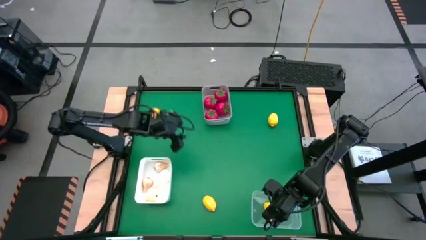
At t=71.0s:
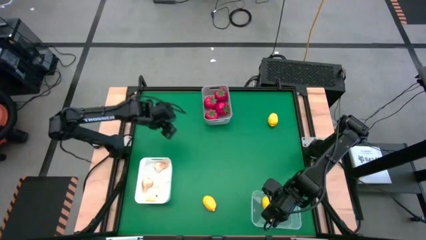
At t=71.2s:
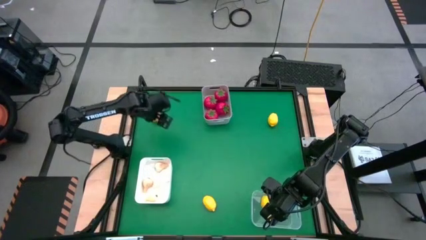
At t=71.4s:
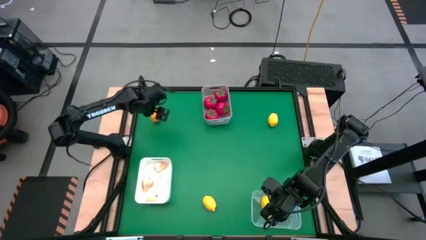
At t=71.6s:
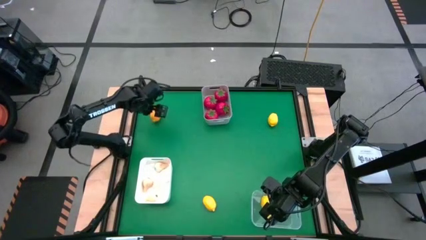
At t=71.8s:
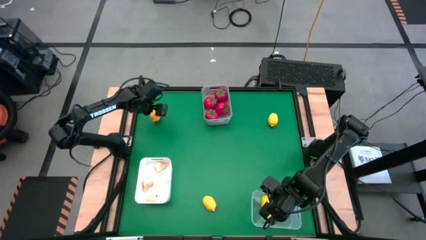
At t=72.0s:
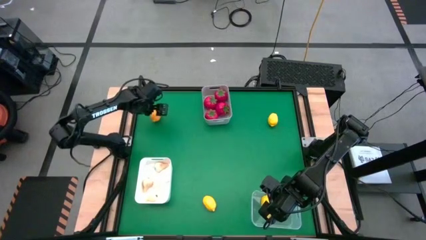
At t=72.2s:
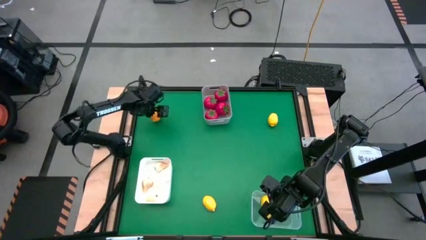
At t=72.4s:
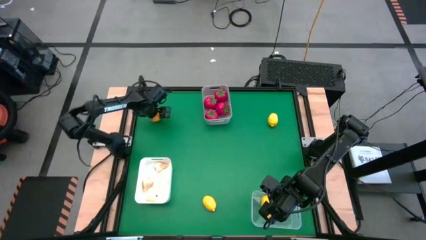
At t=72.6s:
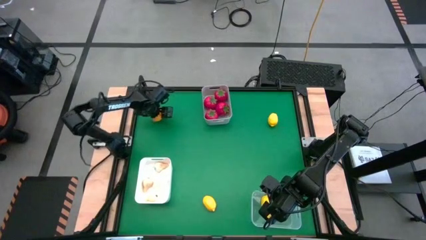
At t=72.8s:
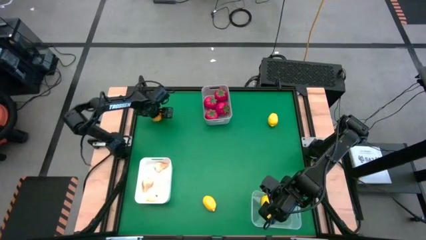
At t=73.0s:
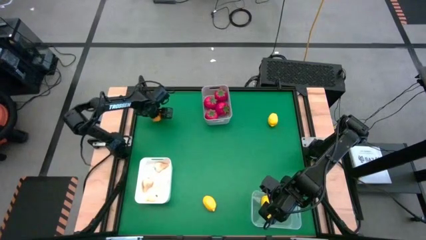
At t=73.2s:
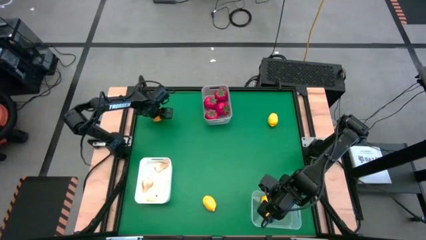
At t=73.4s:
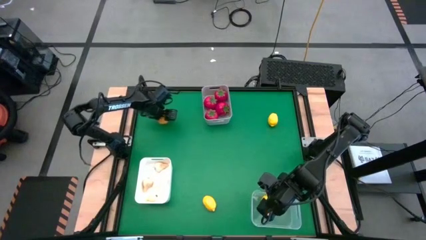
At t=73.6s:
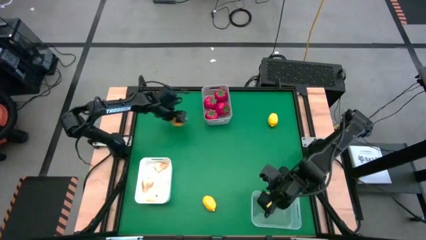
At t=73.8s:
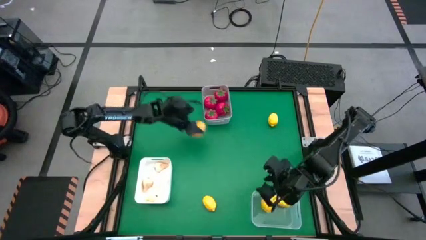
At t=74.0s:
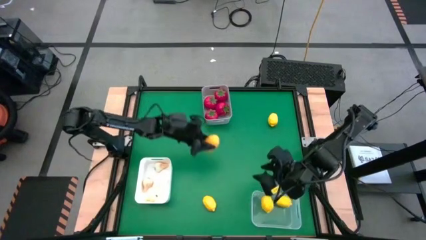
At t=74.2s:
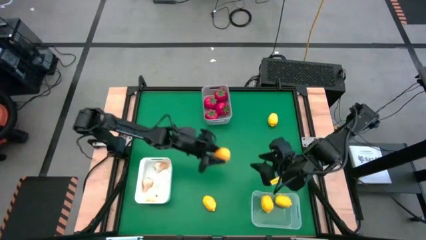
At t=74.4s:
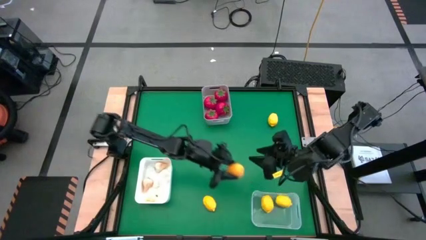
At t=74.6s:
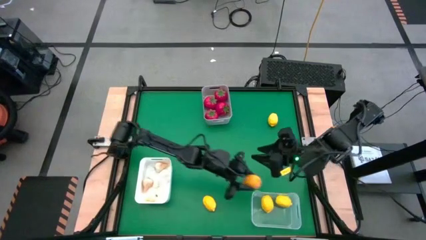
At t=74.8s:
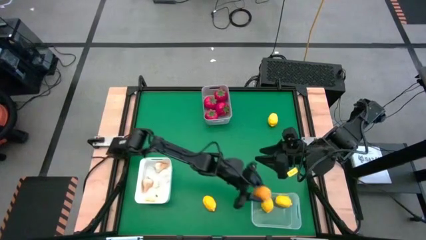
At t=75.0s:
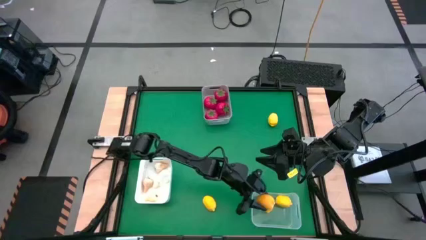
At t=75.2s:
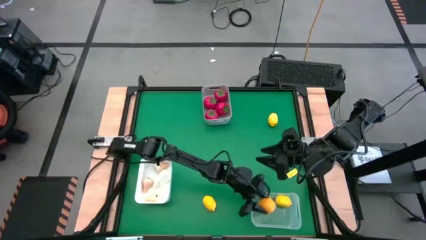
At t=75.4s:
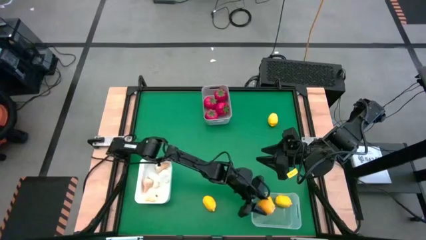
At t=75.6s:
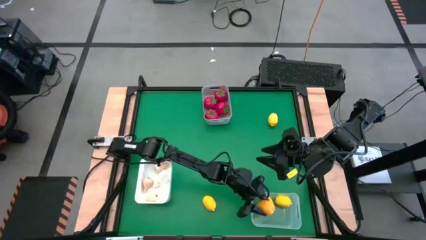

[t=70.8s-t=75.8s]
Task: Sort produce into baskets
Put the lemon into the transparent bin

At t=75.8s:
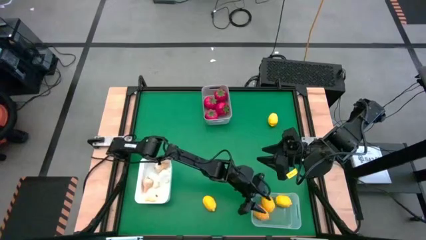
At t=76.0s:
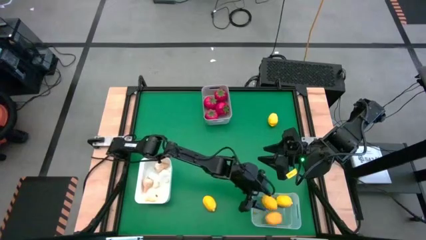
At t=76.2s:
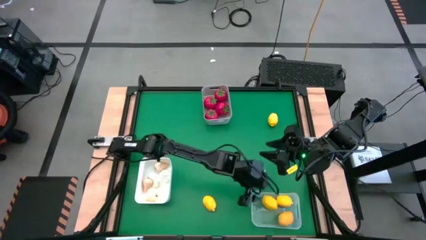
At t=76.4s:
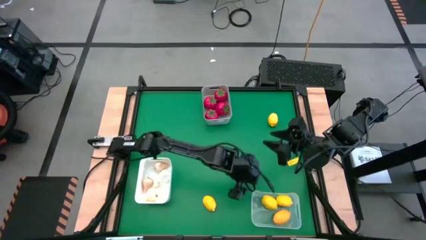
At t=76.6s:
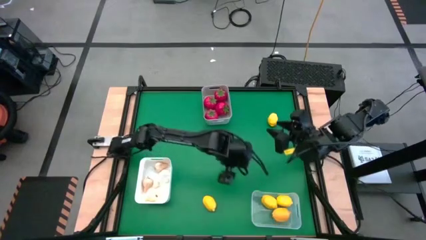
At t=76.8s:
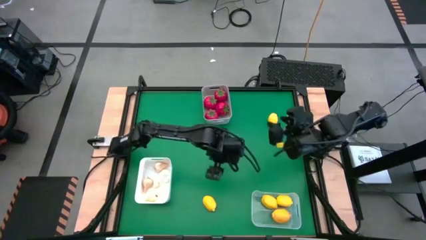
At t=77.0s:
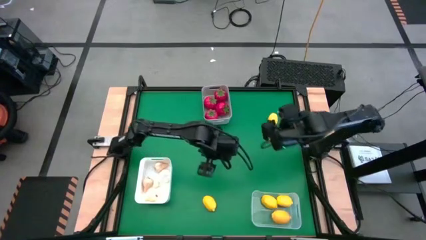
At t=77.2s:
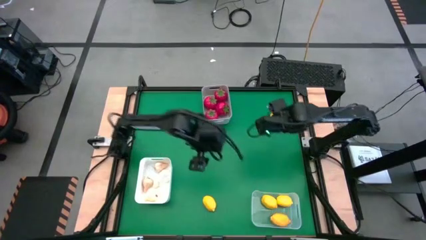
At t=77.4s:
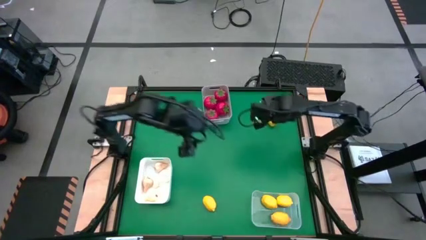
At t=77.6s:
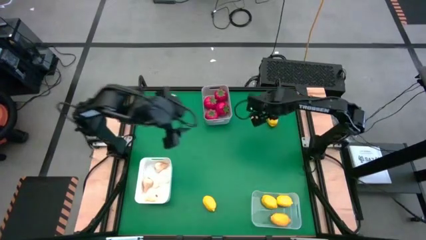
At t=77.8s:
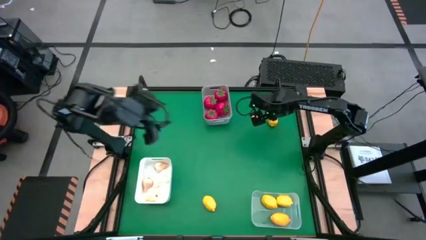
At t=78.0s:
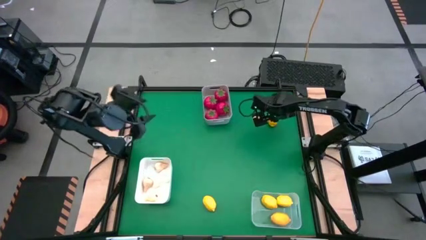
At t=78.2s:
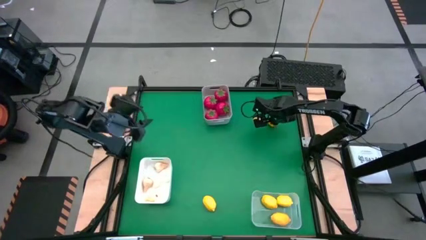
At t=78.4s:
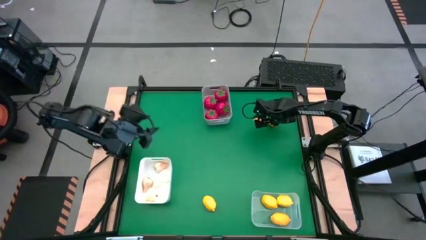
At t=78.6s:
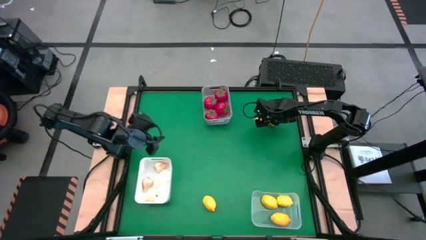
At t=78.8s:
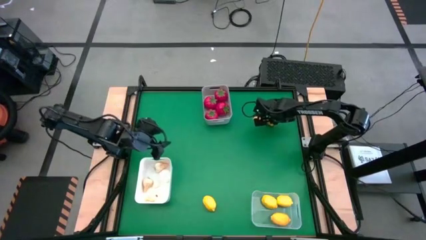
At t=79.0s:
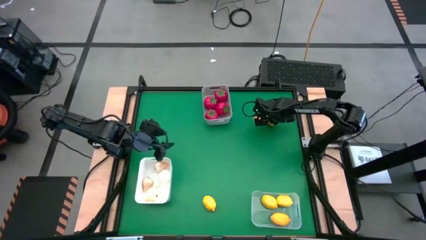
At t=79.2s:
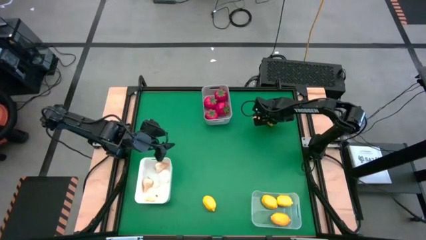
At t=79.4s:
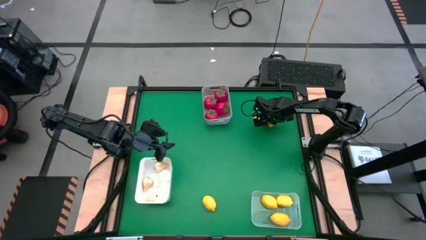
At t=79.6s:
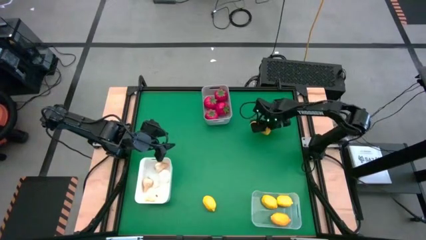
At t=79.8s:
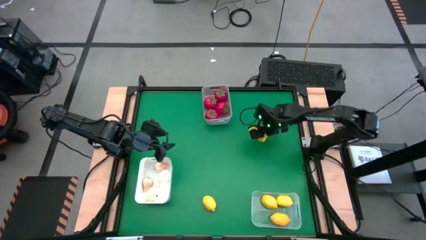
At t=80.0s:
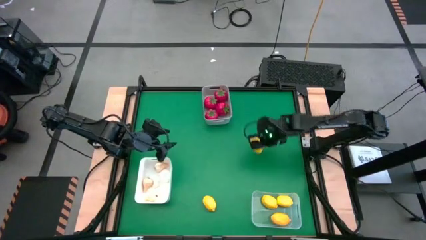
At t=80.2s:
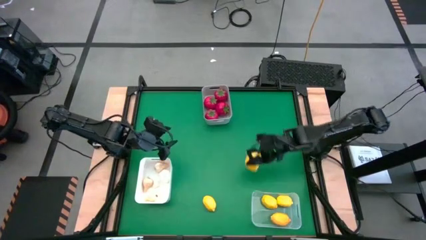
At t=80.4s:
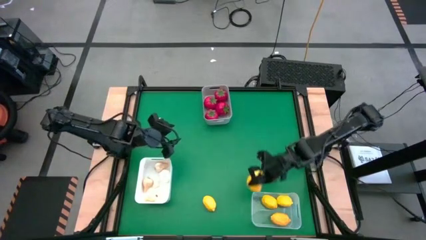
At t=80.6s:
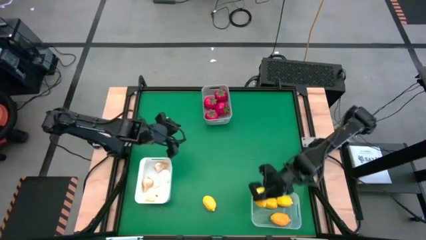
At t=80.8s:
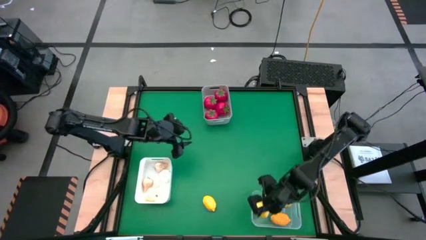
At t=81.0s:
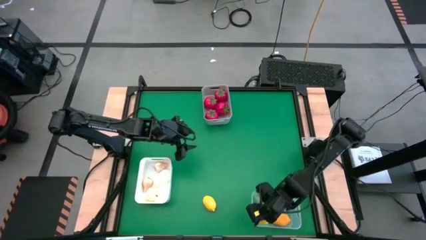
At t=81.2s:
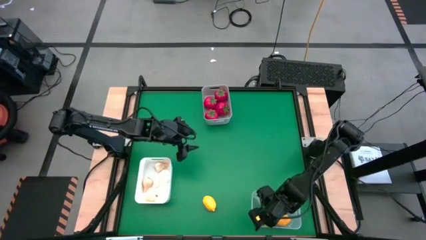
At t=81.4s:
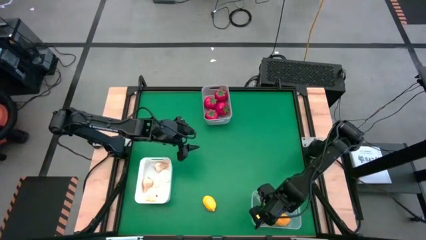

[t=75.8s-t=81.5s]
Put the lemon into the transparent bin

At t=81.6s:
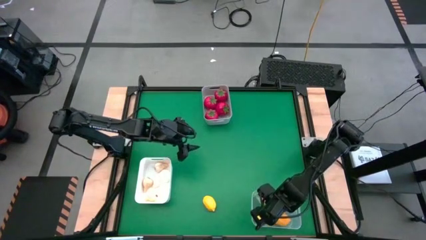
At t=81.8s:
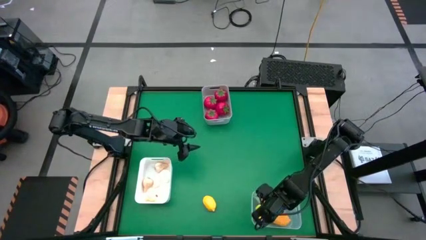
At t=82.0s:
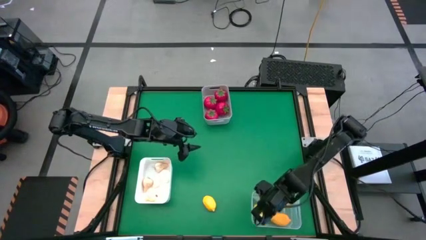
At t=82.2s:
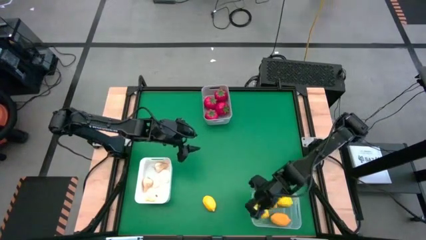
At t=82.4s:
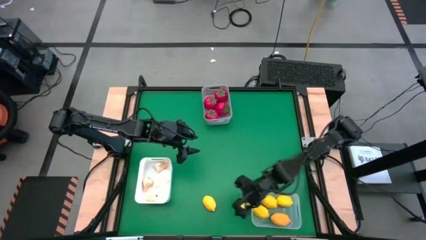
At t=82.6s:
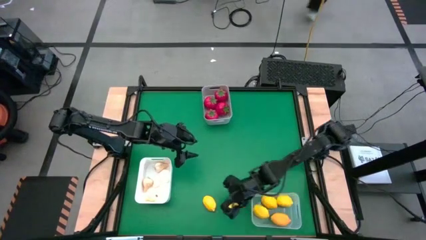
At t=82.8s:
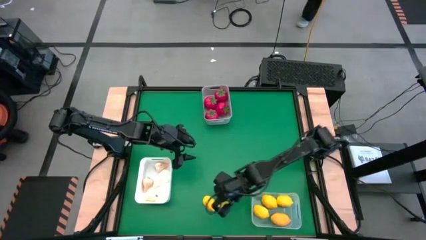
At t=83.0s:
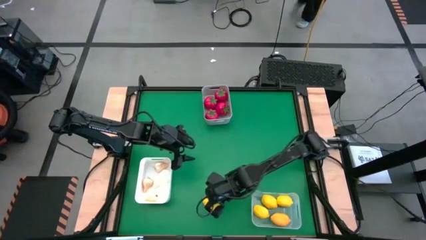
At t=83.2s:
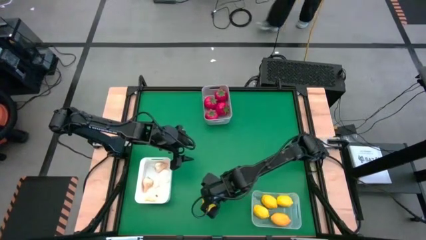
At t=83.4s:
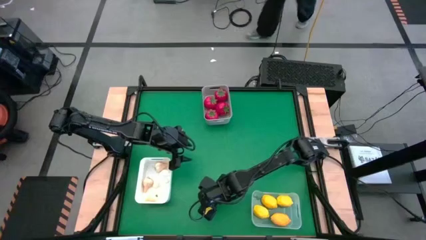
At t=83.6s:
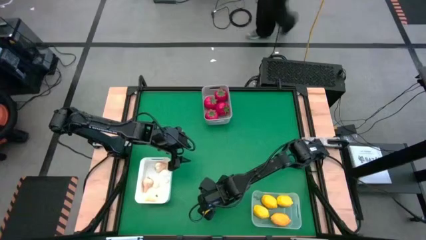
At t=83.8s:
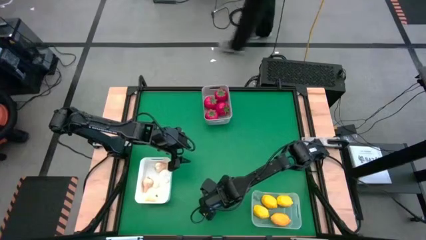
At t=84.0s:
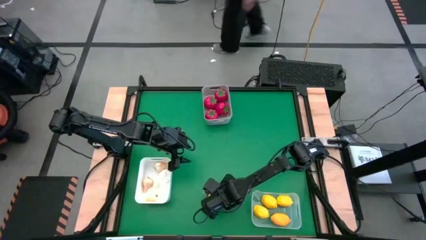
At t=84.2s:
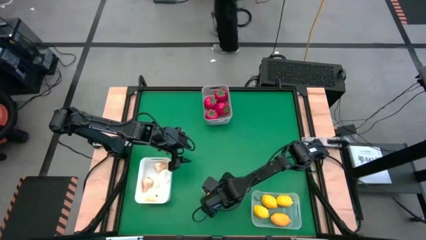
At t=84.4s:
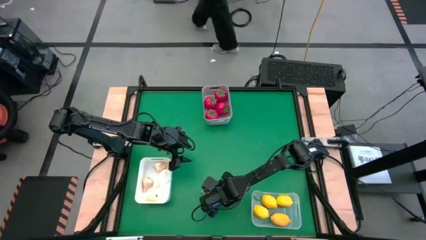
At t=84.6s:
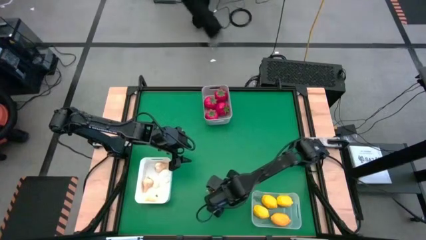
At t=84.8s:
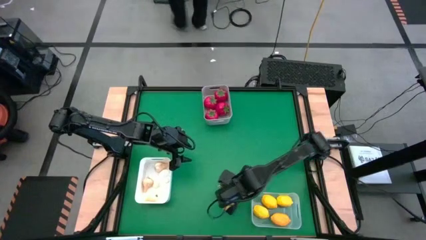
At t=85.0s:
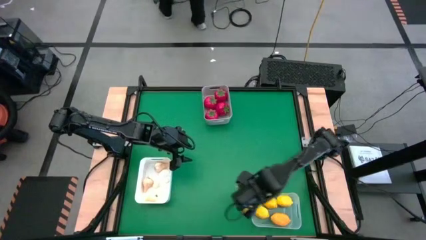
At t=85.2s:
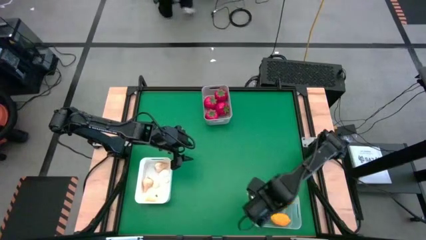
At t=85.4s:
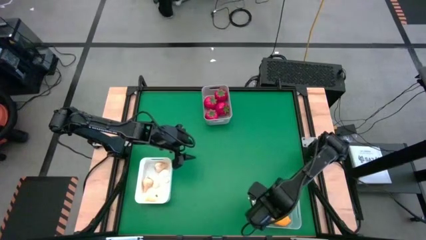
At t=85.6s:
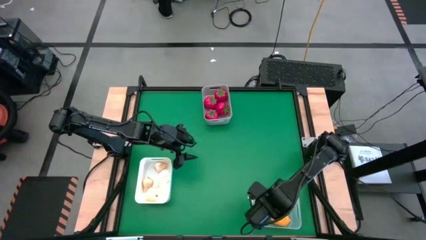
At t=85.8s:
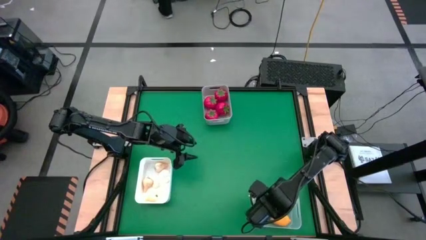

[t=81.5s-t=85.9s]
Put the lemon into the transparent bin
